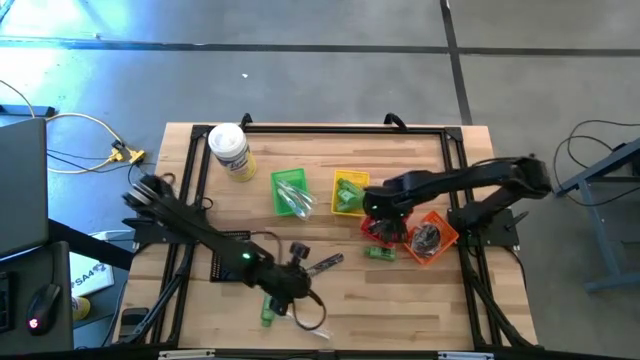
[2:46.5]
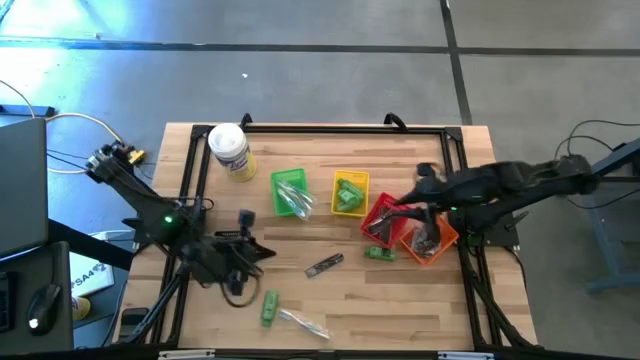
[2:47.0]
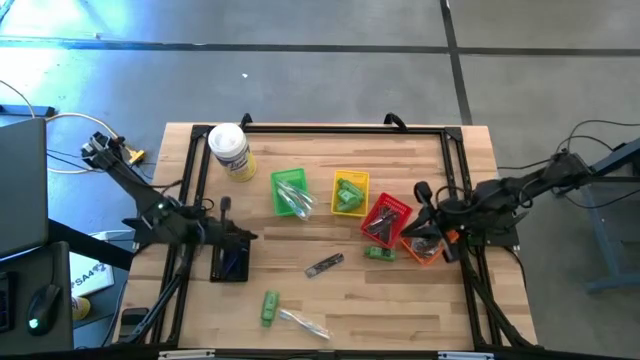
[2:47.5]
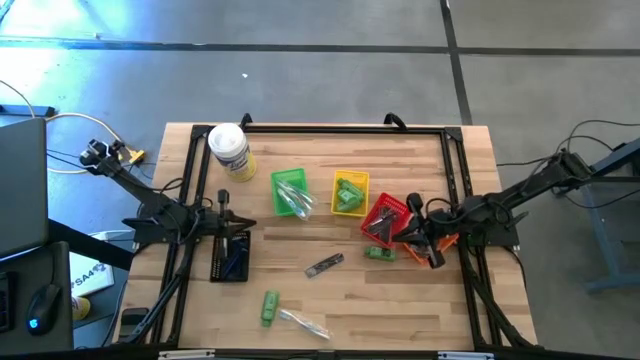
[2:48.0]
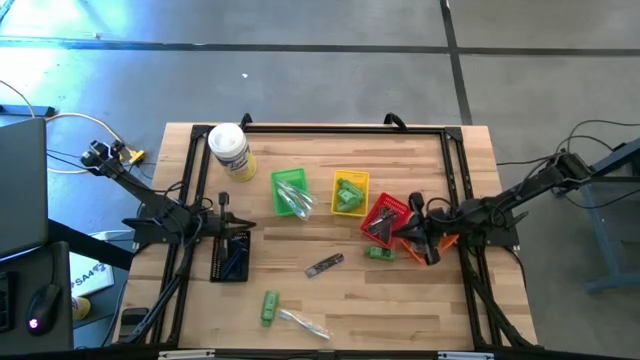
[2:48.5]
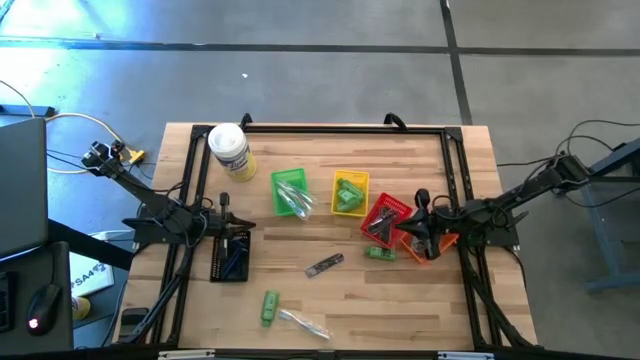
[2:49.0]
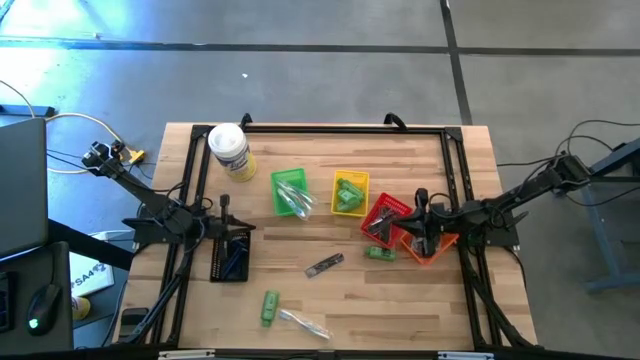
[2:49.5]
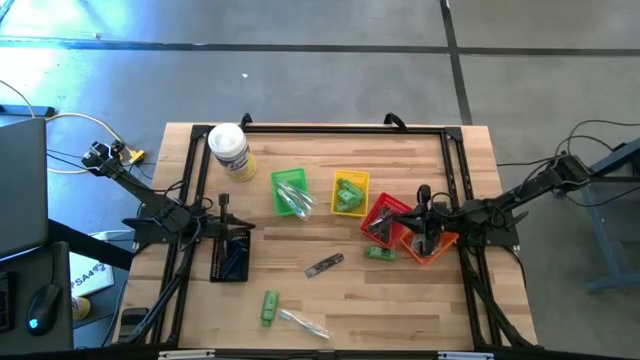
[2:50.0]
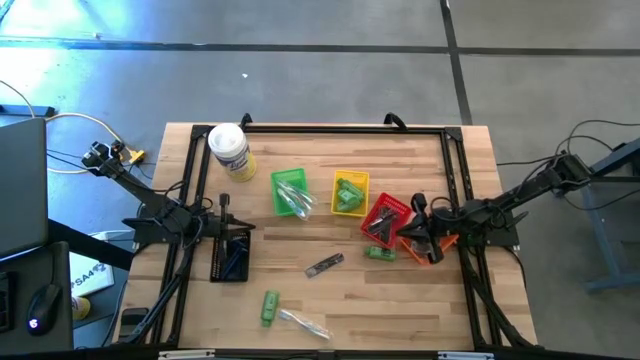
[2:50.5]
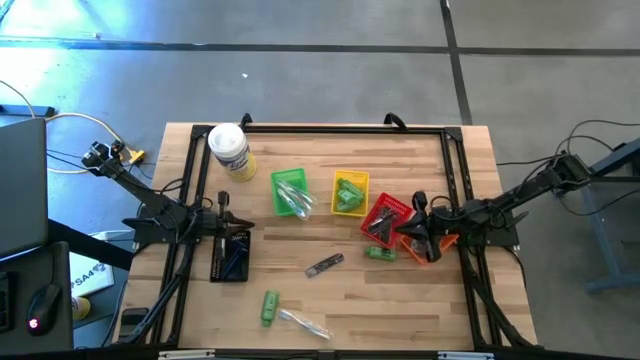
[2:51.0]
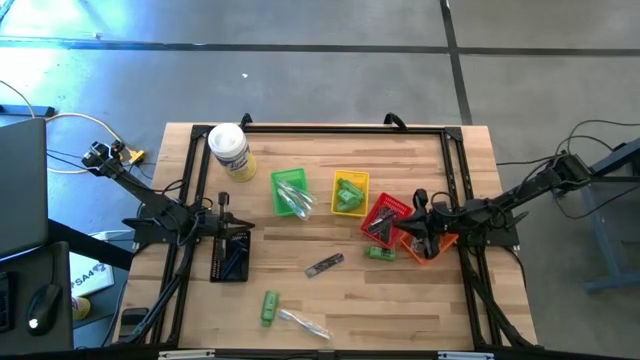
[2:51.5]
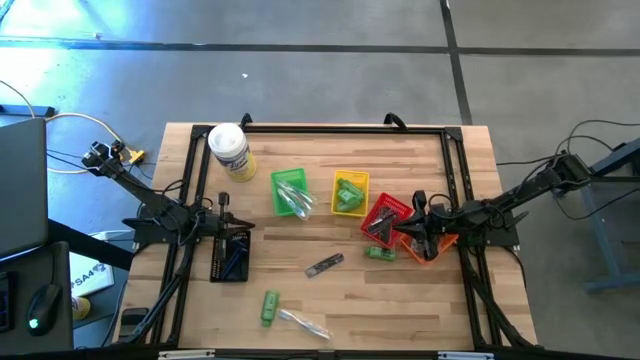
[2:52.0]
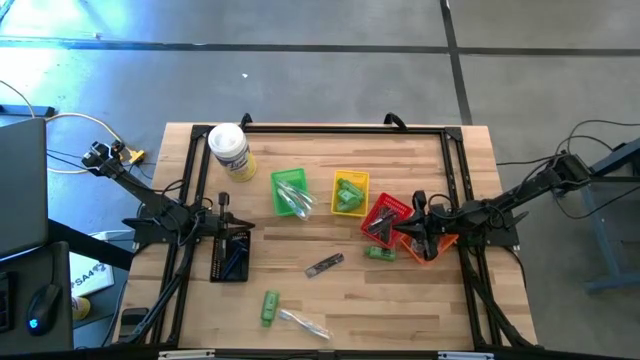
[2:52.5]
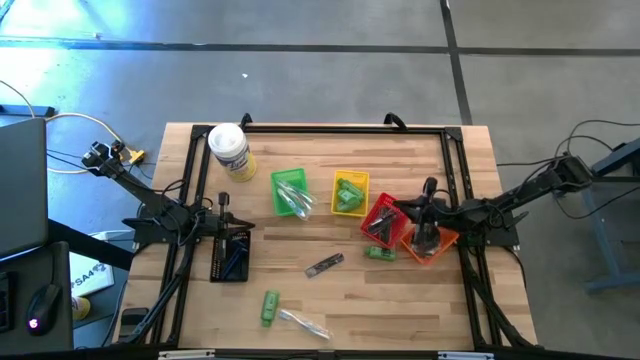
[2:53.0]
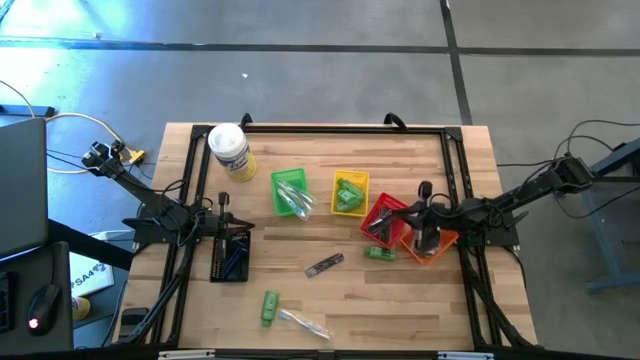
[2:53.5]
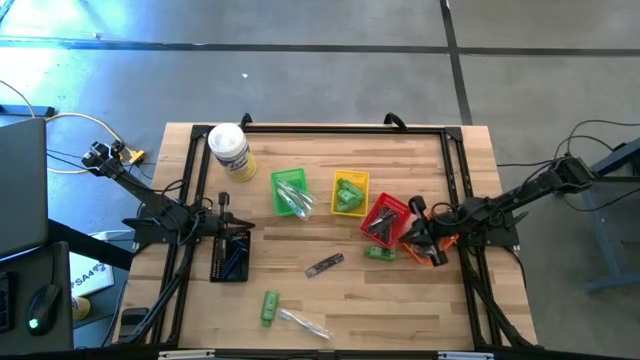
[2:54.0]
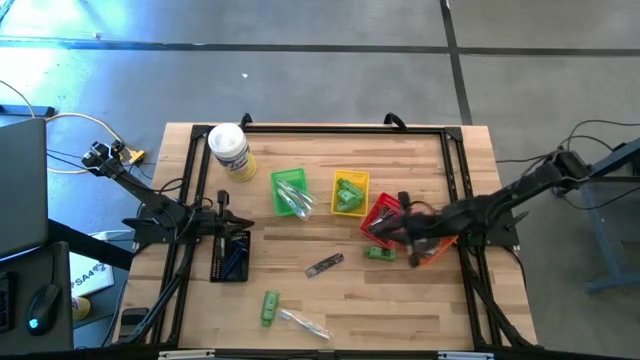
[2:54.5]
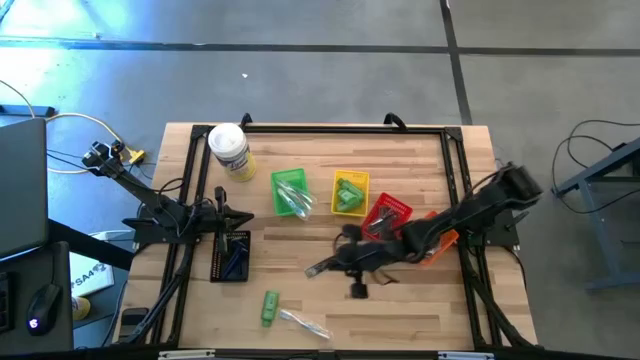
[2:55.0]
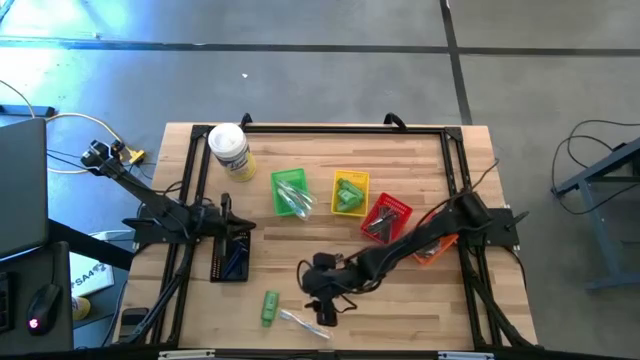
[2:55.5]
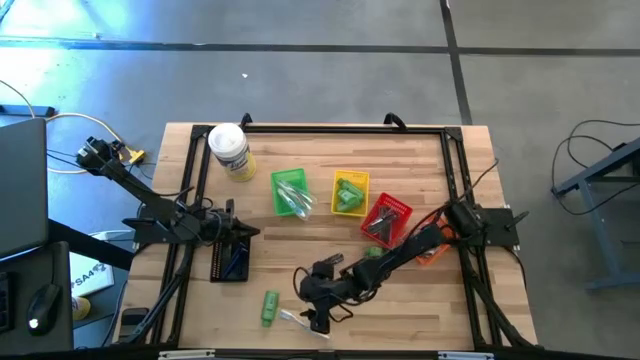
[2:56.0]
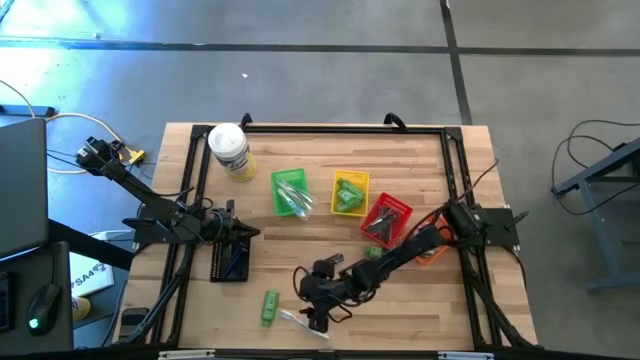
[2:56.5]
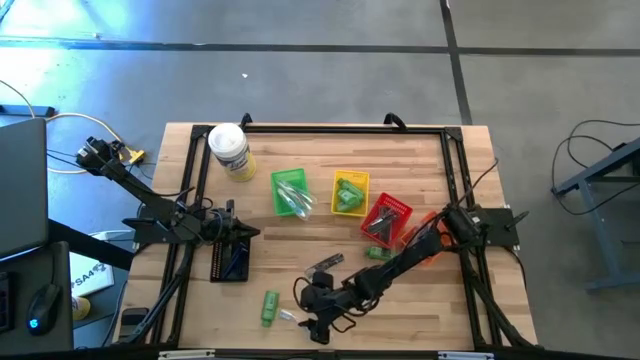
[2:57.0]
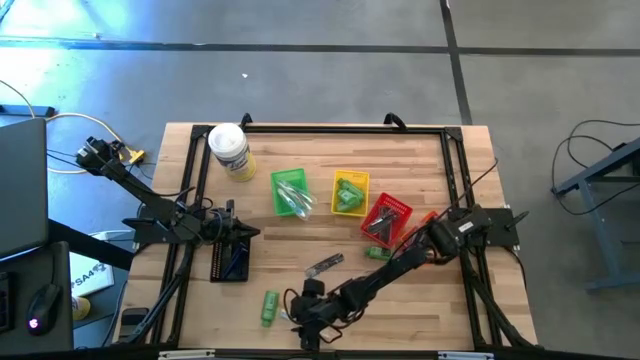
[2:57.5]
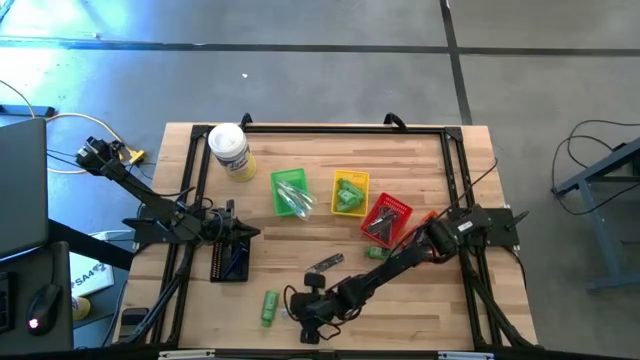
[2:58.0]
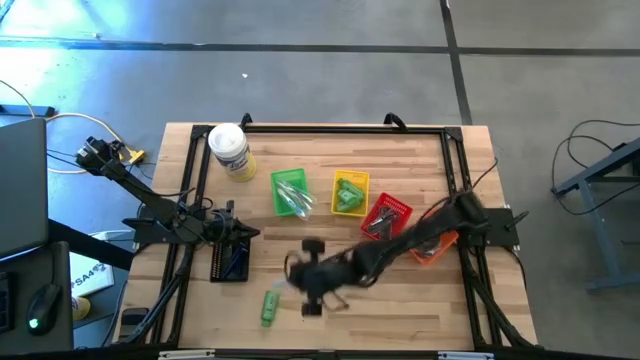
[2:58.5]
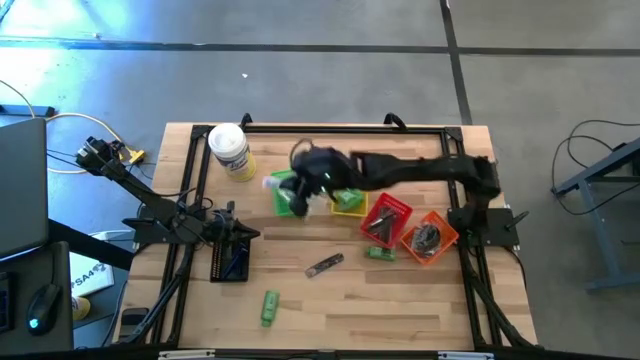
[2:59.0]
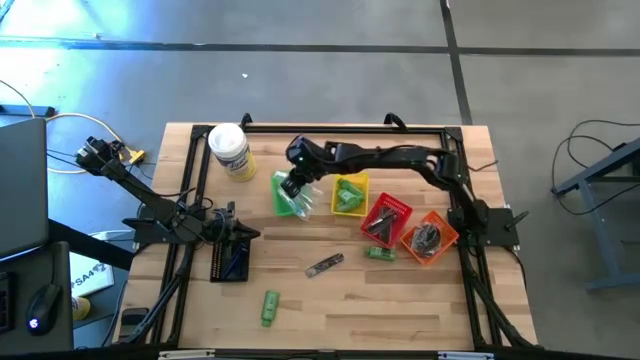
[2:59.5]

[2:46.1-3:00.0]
Task: Pick & Place Travel size toiletries
Put the blue toothbrush into the green bin

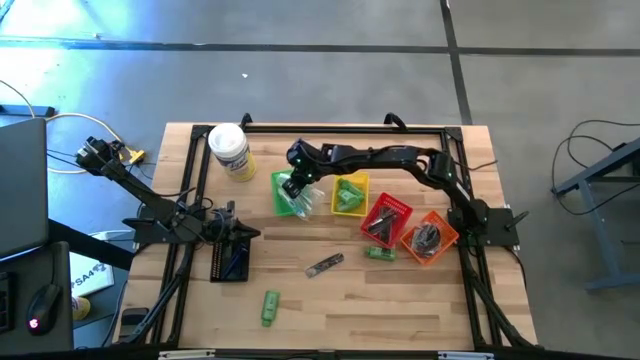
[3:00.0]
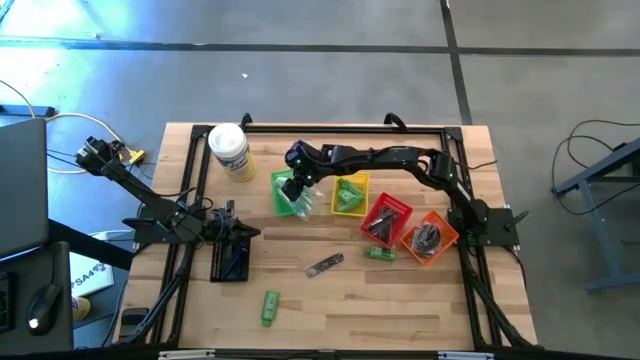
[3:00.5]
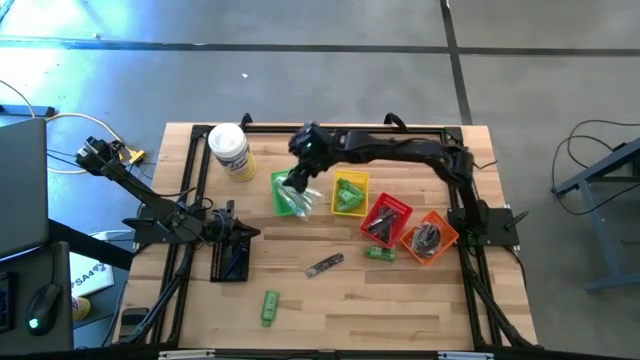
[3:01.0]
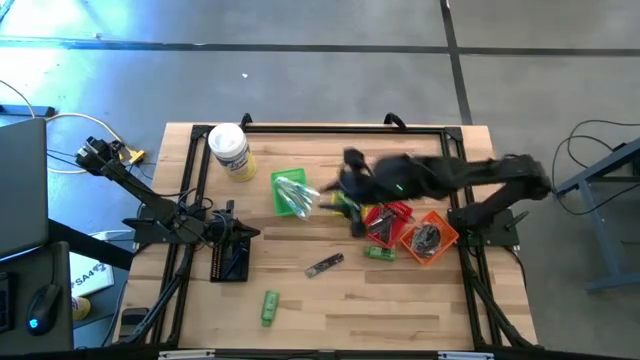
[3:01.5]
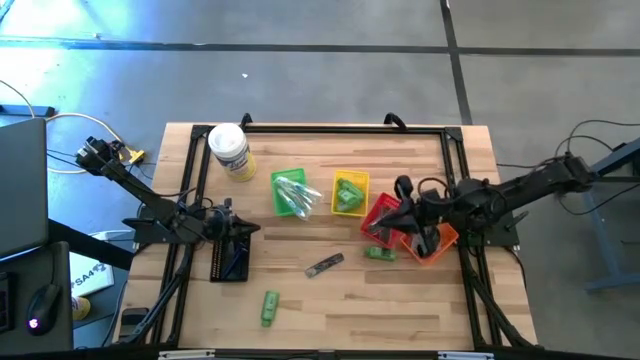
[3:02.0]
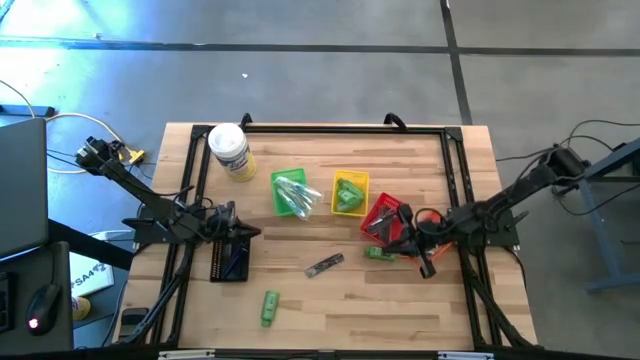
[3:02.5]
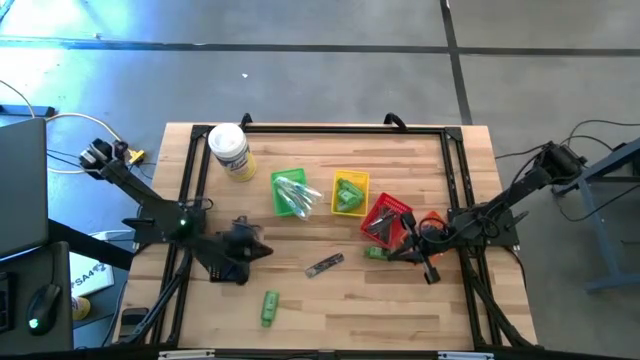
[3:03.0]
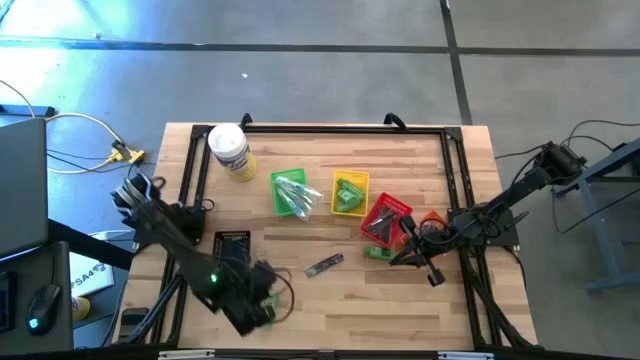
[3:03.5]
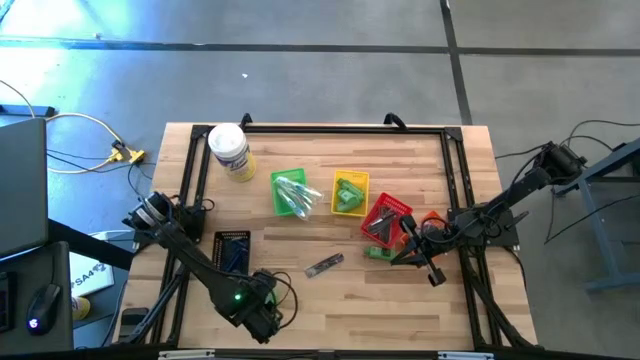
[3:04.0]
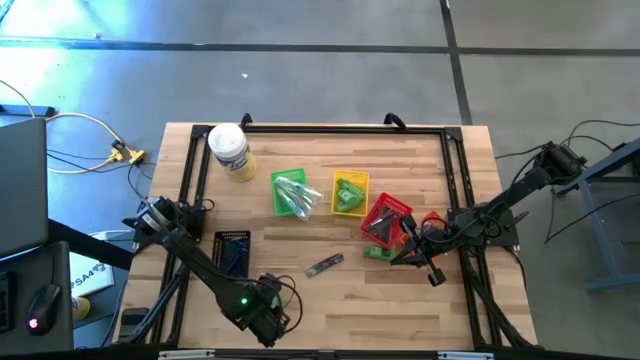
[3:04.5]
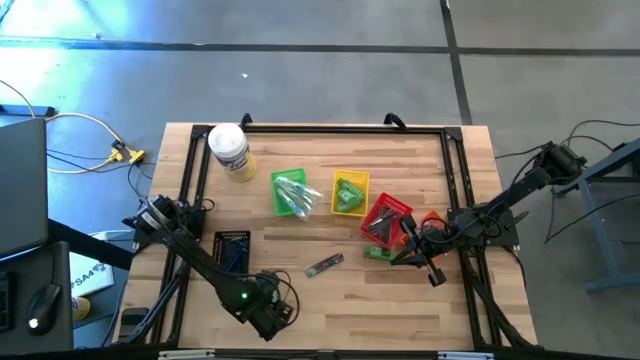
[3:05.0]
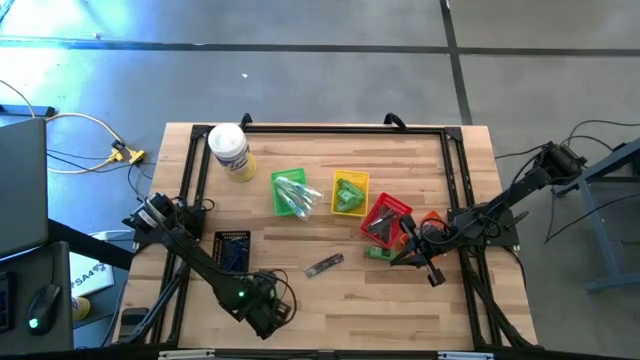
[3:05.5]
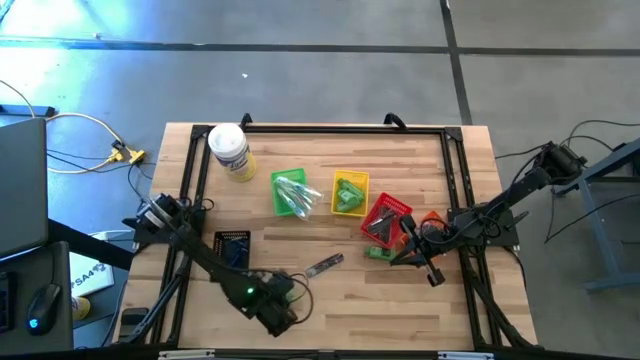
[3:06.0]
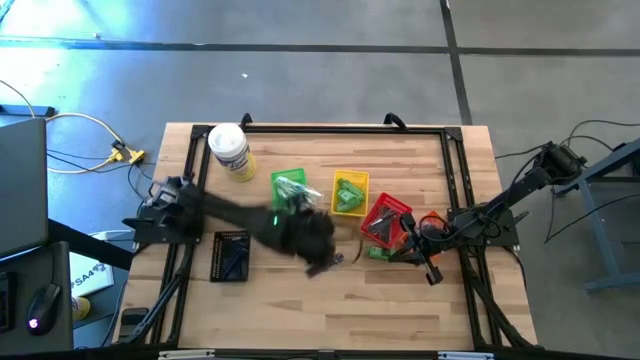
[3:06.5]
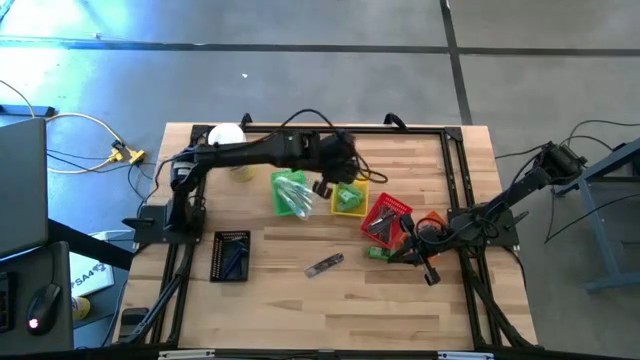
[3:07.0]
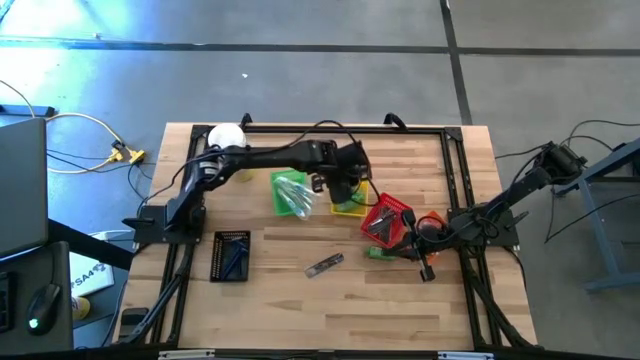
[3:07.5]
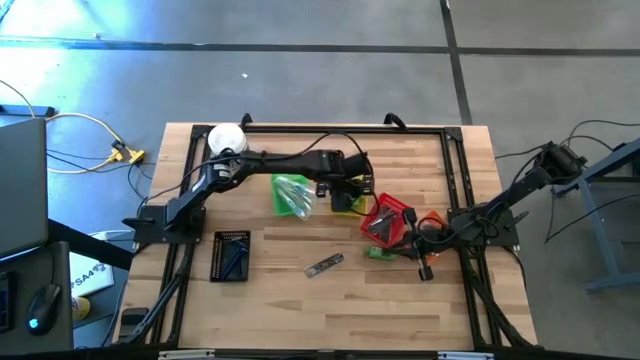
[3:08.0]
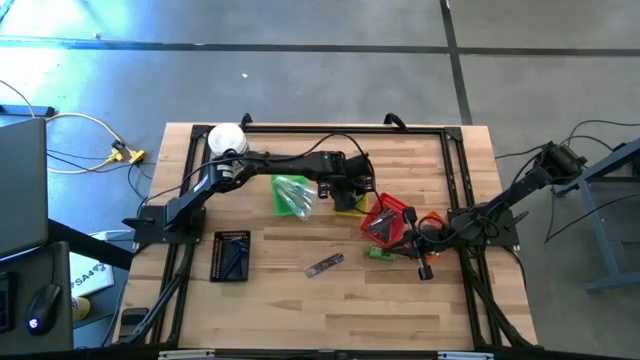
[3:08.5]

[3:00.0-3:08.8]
Put the green shampoo into the yellow bin
